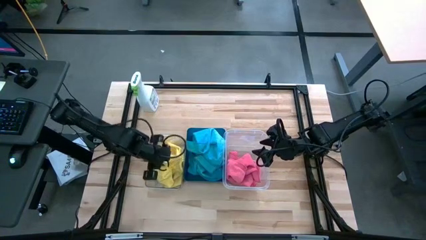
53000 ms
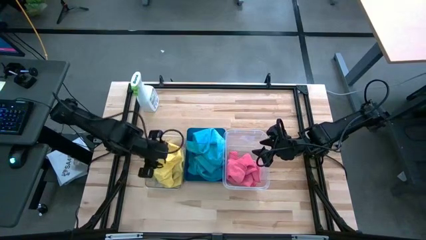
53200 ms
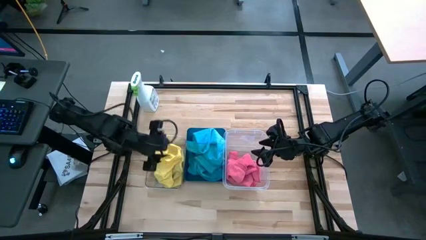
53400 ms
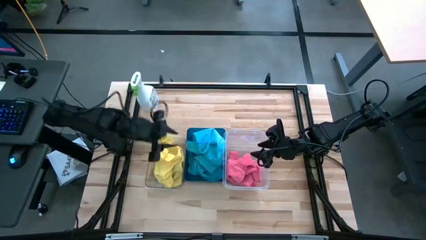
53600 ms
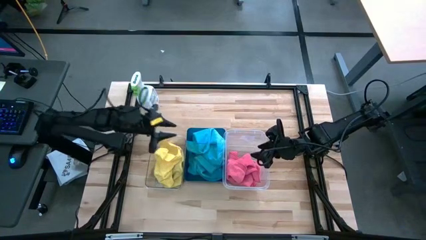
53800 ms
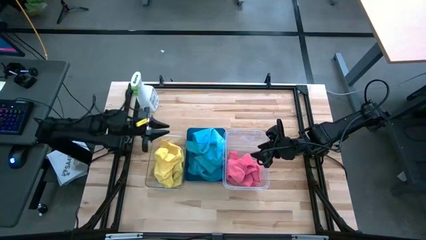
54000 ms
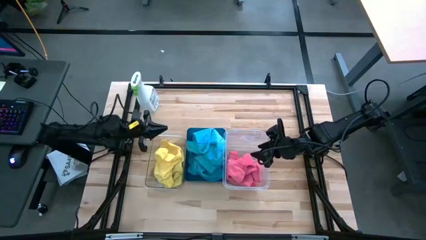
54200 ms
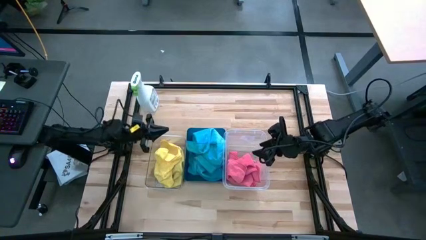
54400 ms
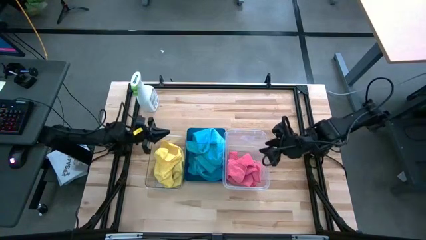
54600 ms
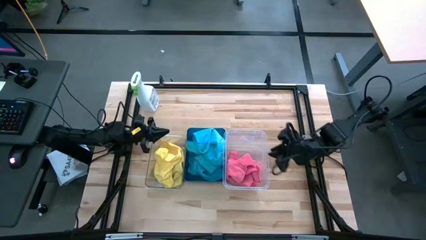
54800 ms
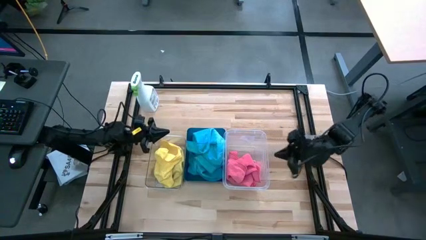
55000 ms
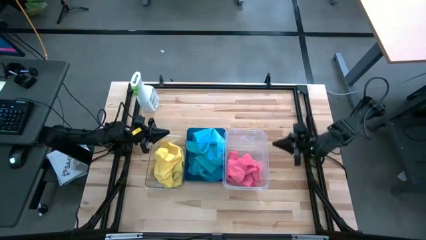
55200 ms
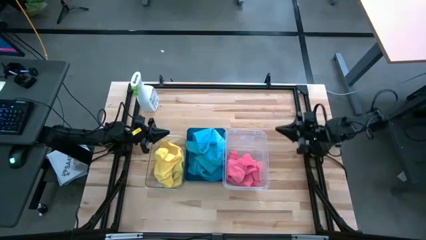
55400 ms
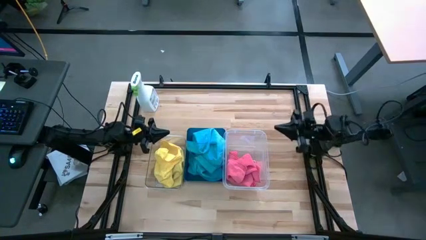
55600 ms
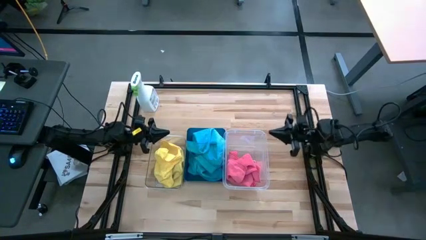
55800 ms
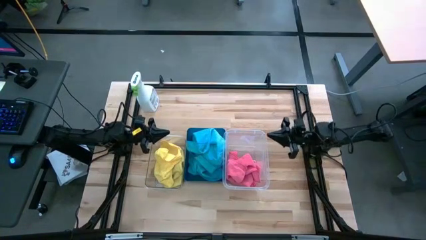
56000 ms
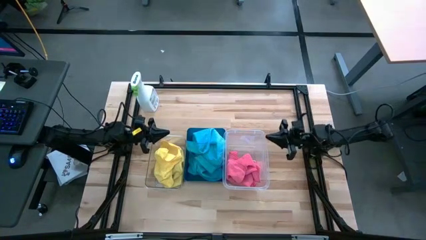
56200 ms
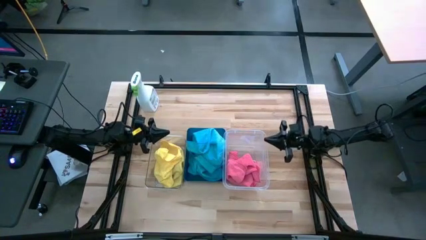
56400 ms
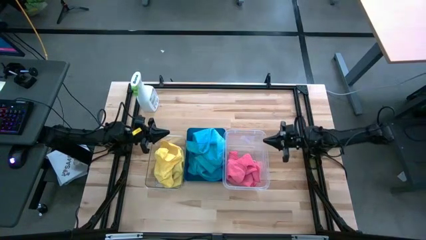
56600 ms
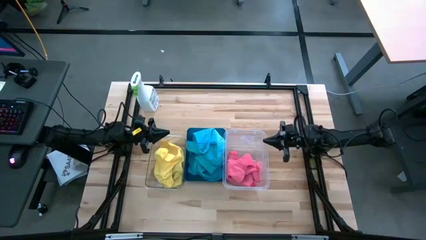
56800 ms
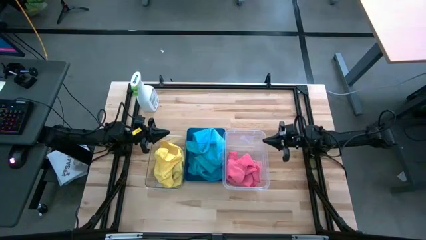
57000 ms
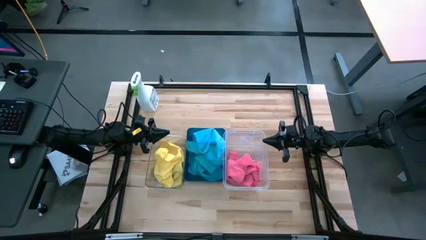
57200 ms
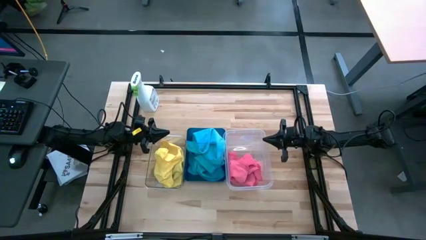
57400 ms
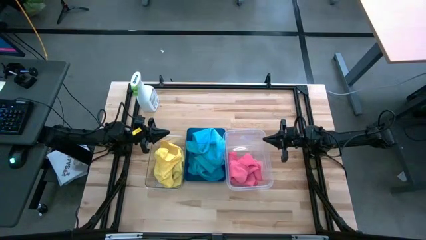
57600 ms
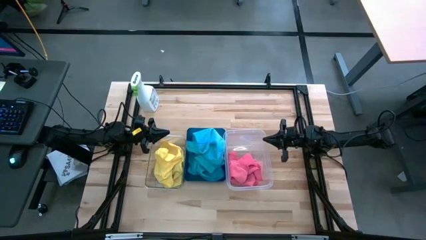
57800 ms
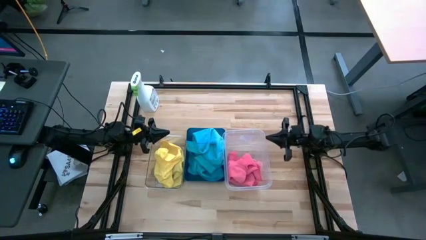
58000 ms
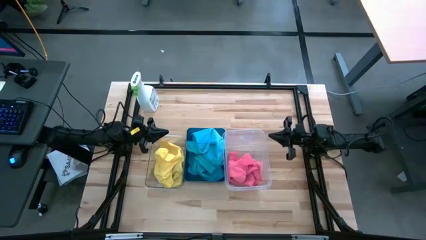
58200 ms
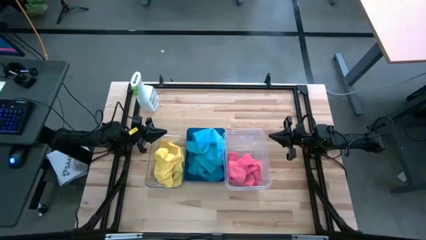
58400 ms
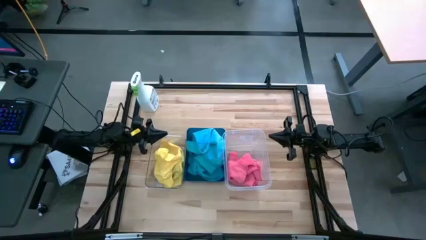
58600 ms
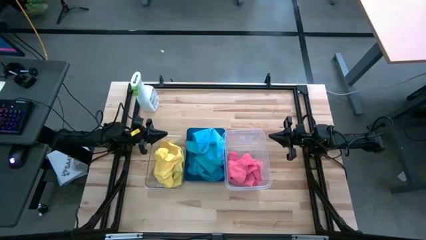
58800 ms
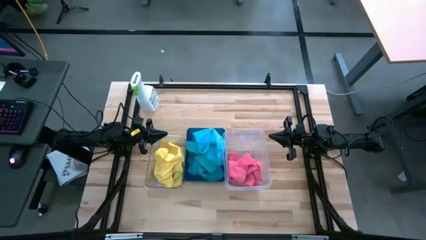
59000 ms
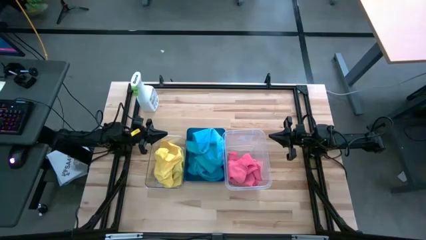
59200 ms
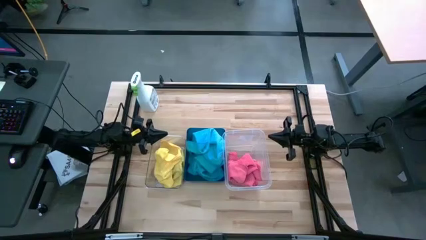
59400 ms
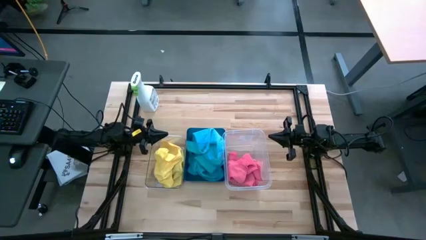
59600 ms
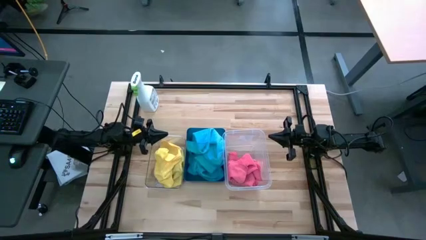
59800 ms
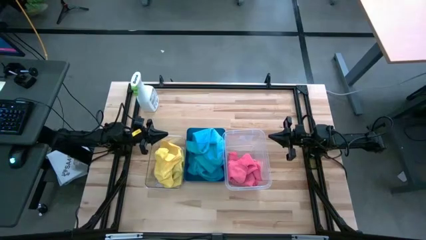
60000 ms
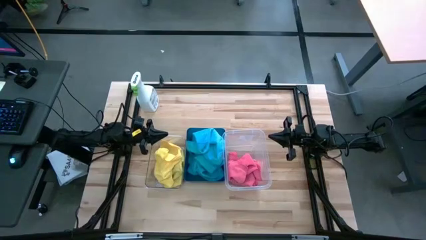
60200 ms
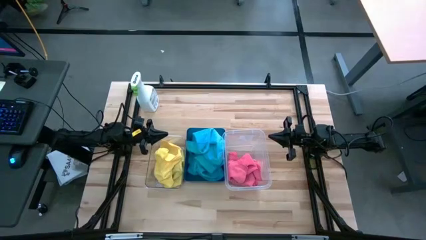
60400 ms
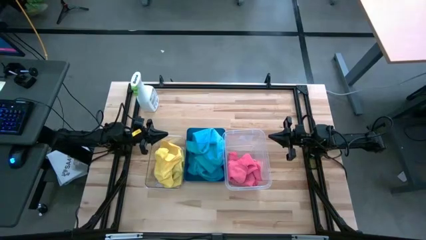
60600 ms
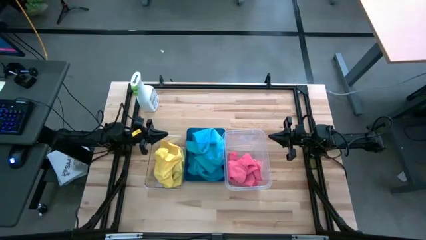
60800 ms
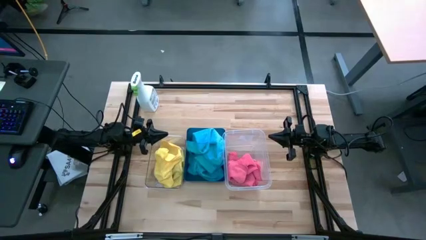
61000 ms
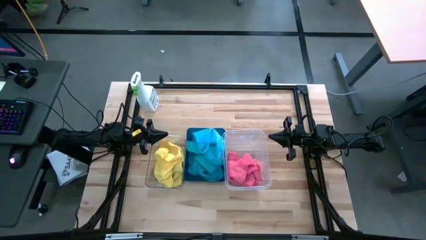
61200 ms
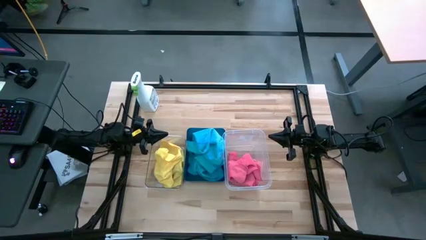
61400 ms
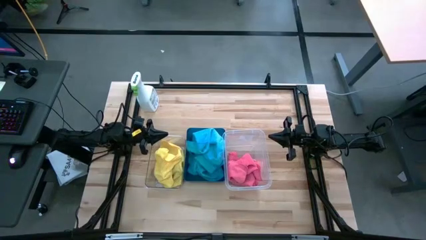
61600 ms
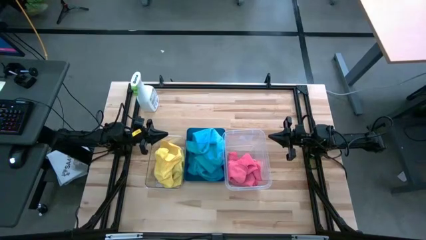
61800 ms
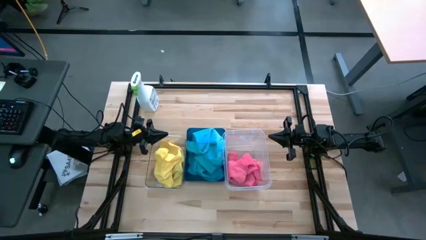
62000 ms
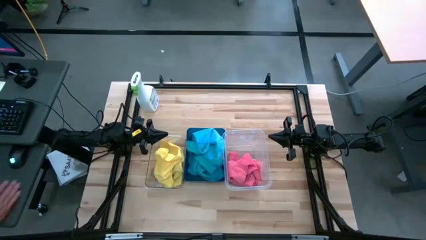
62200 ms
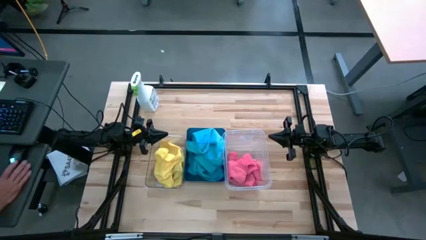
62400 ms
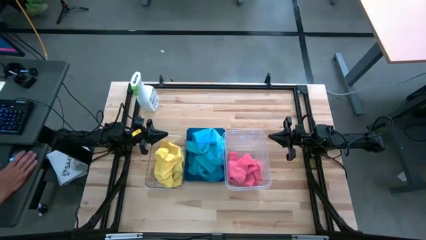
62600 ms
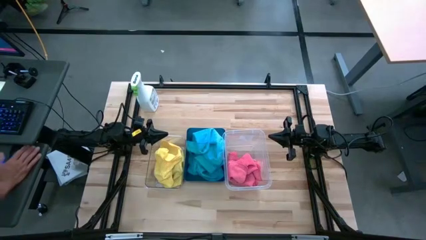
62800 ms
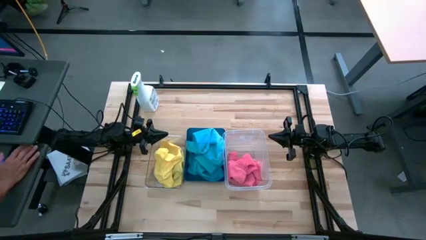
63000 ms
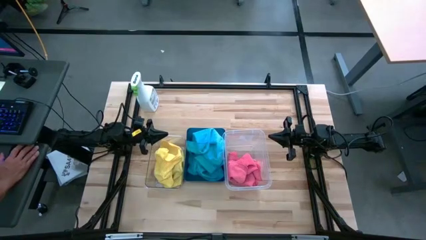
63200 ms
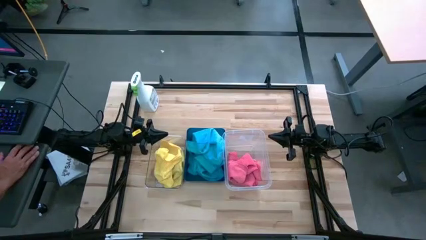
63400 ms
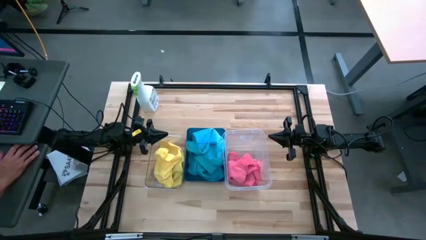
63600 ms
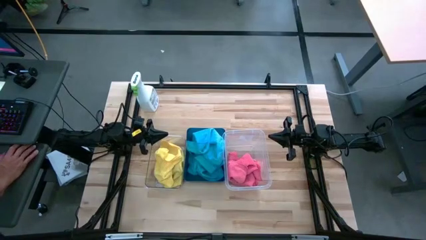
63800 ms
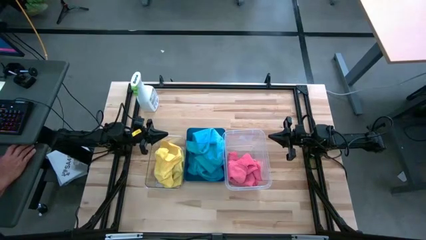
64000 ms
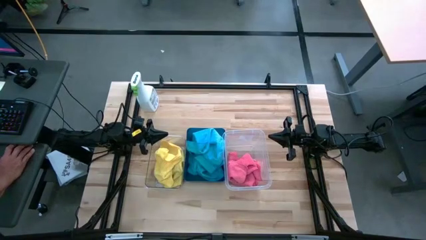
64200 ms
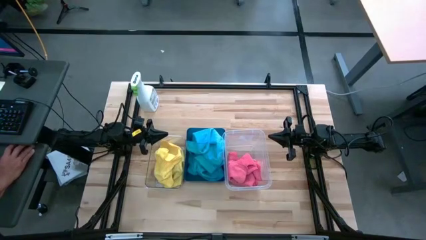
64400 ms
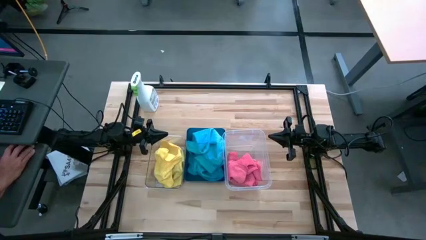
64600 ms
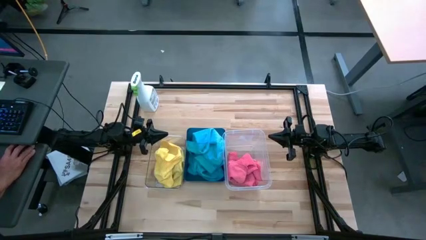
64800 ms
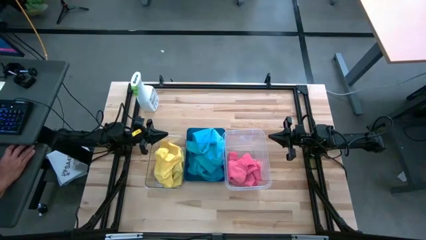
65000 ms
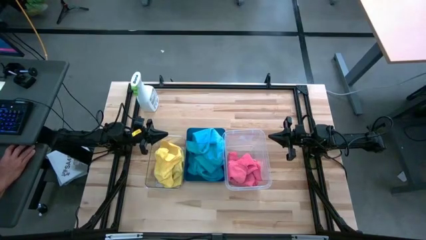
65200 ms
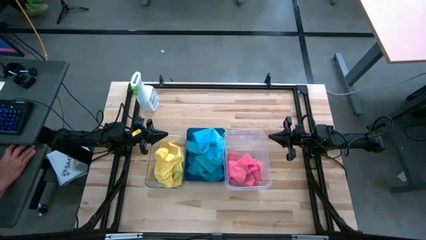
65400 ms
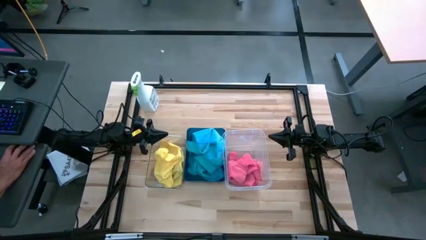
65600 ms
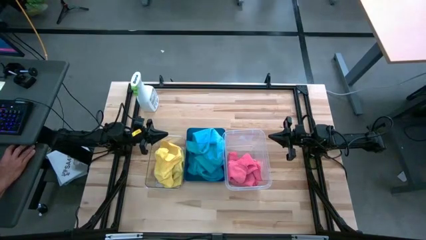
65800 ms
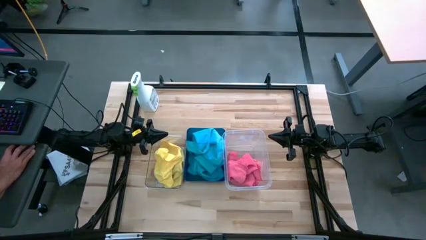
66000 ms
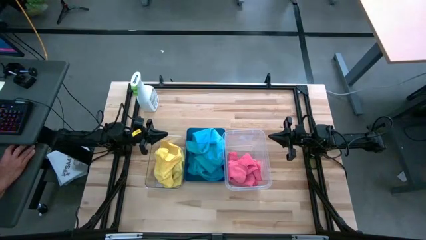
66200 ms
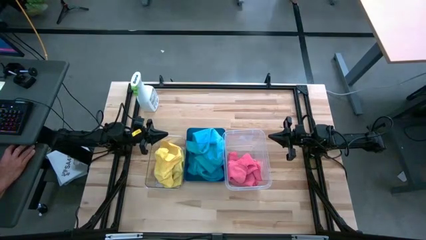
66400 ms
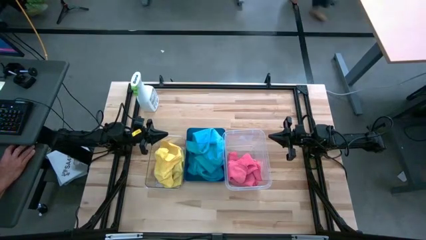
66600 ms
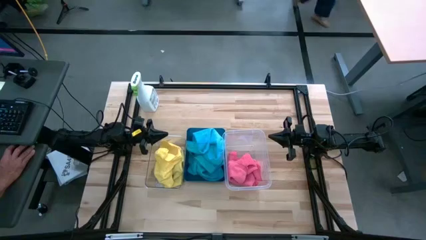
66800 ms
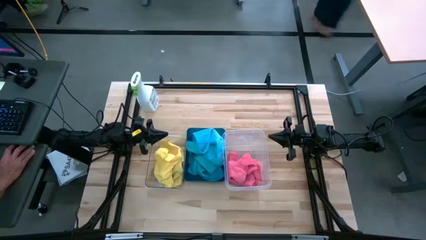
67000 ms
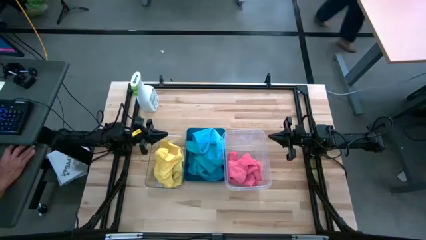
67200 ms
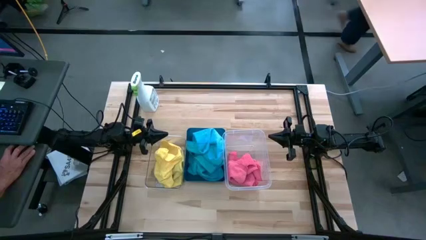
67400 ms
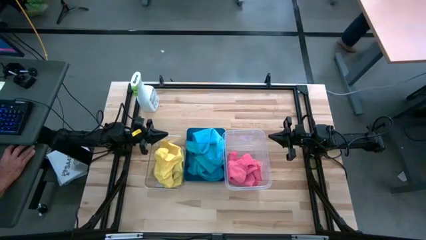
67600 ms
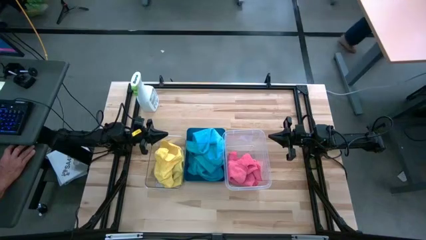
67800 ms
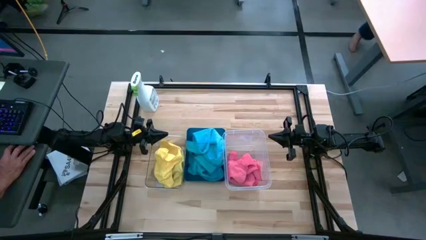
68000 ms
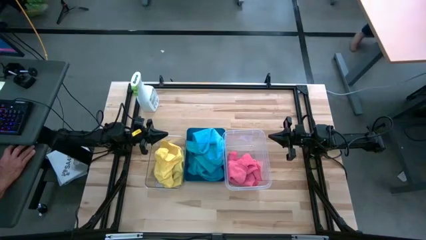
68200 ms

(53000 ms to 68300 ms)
Task: Sort microfiber towel by color & place in baskets
Return to Home Position

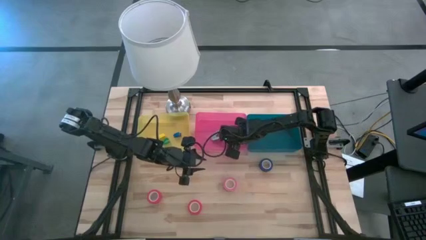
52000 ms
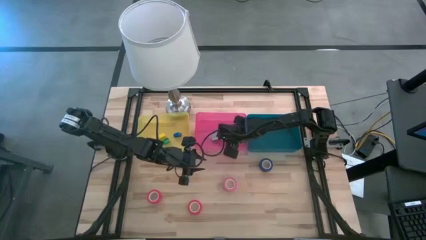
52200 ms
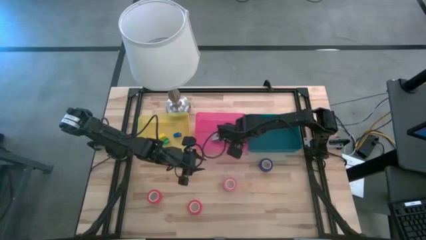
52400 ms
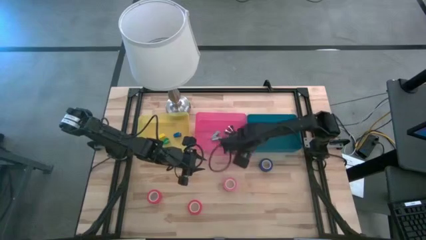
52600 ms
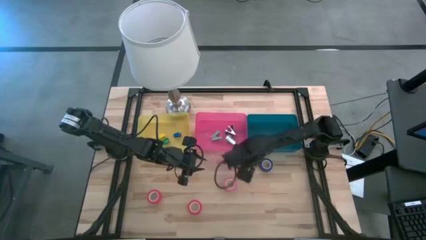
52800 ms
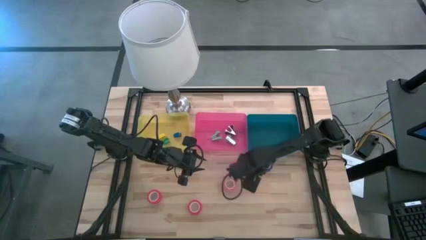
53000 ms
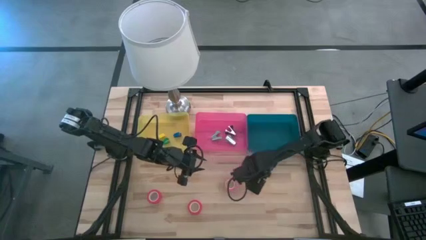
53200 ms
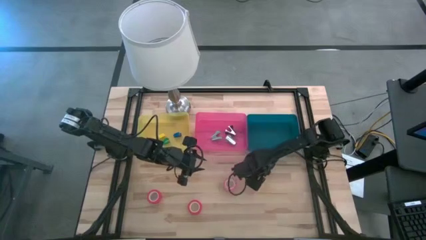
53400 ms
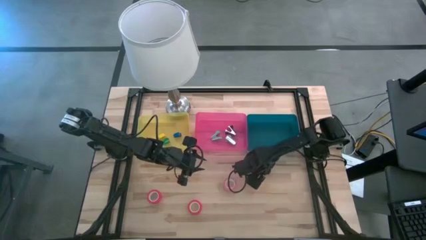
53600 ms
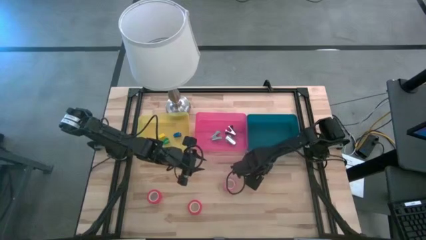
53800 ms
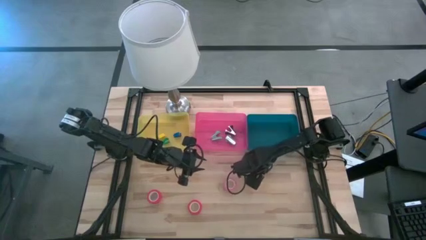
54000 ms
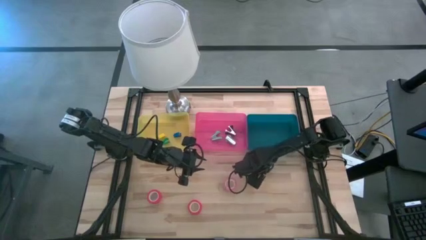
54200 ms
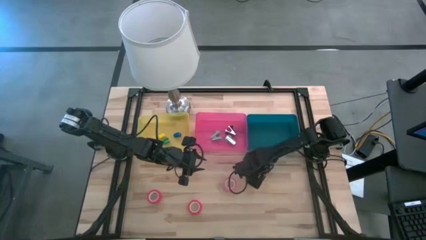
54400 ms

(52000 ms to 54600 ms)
Task: Pick and place Stapler, Stapler remover, tape
Put the blue tape into the blue bin
